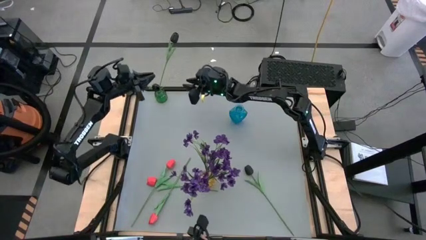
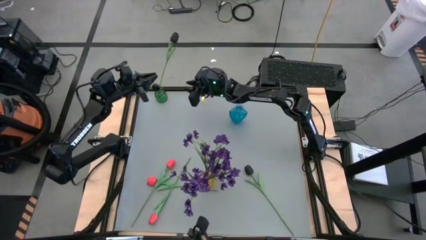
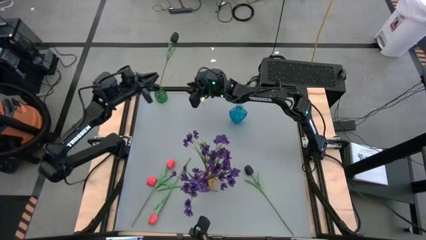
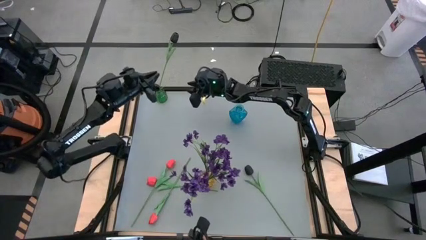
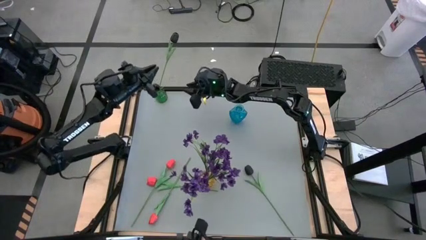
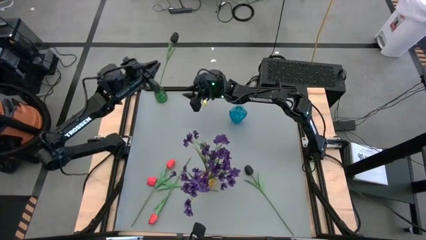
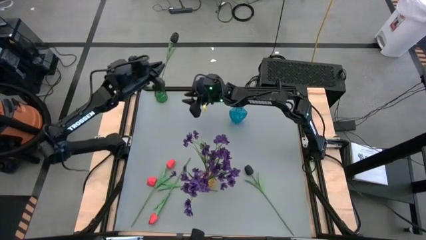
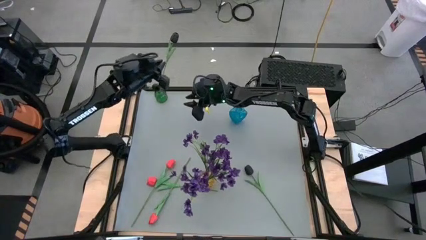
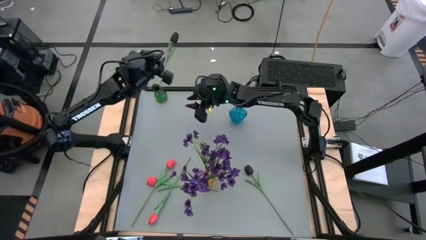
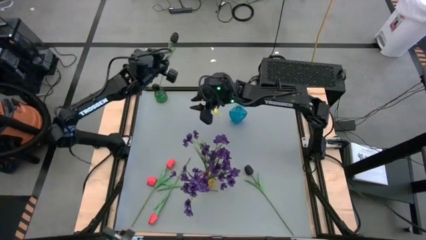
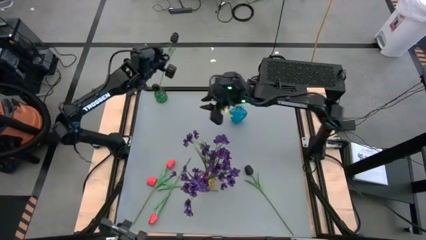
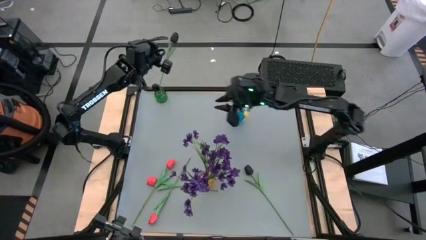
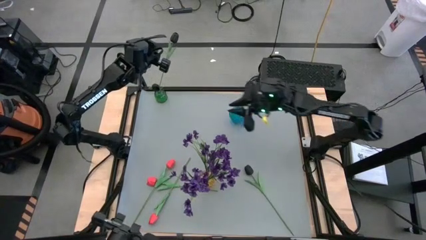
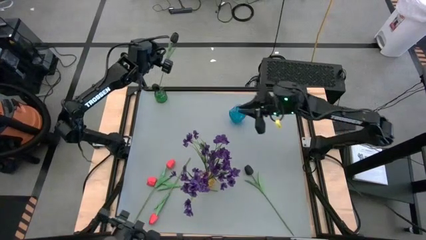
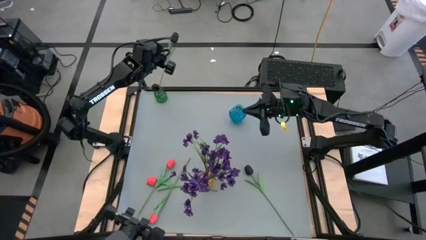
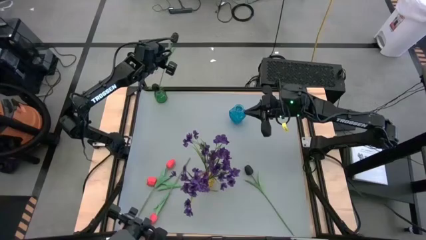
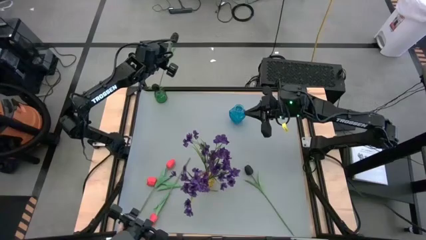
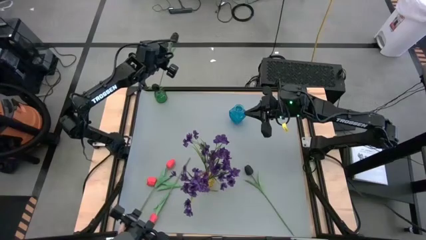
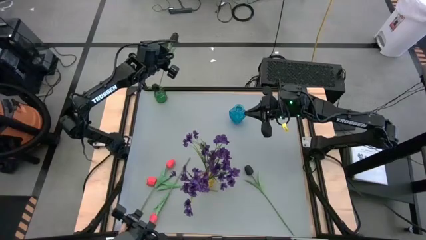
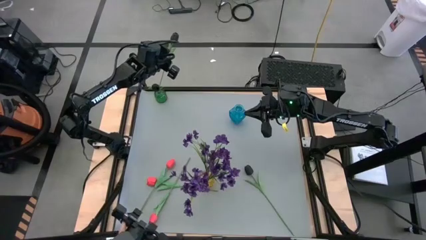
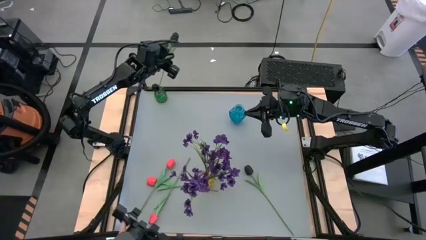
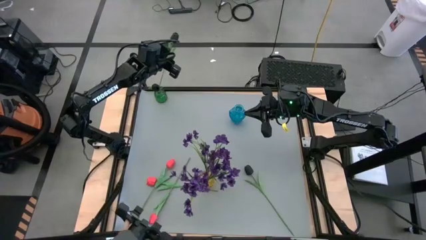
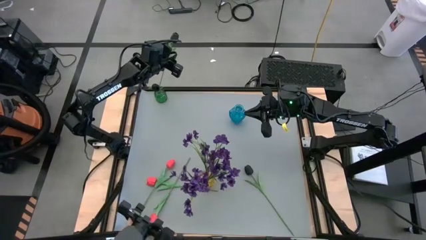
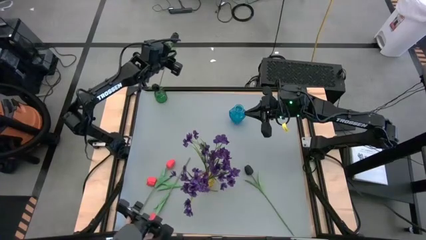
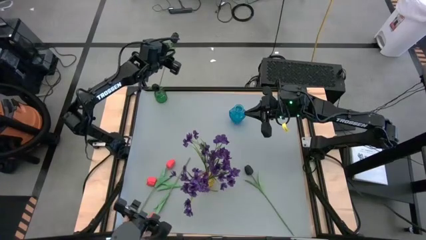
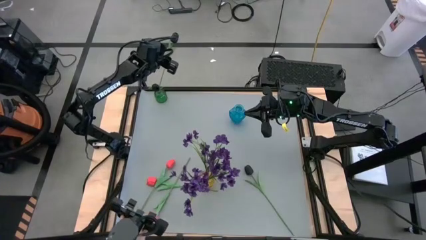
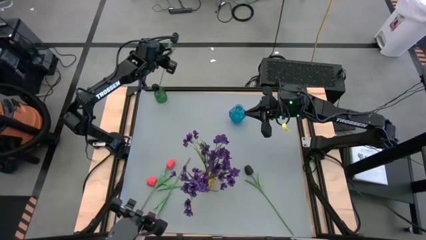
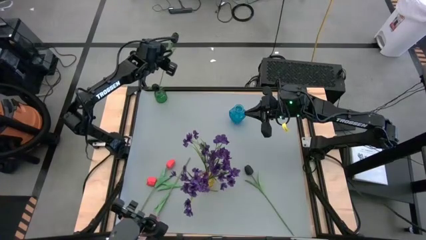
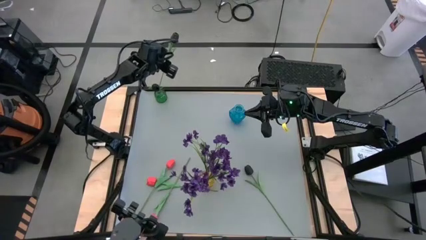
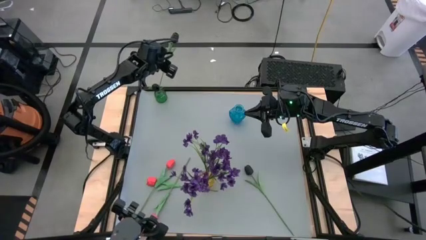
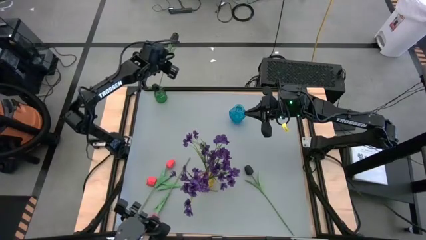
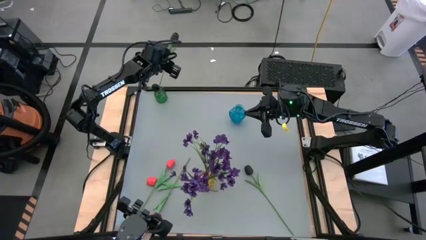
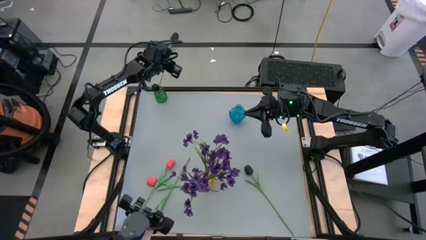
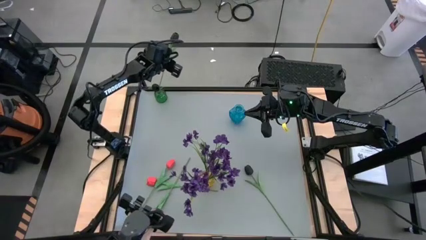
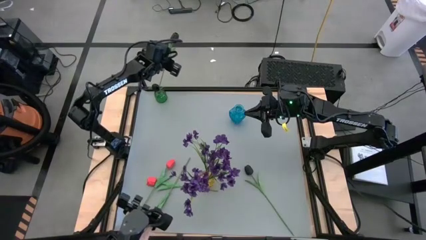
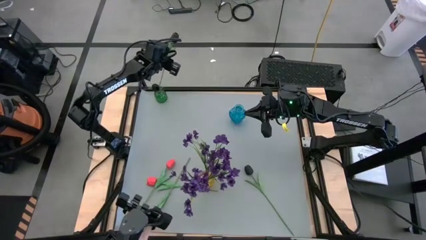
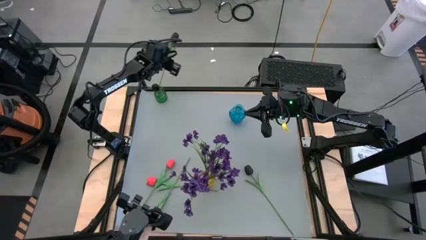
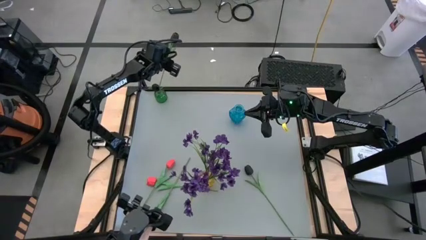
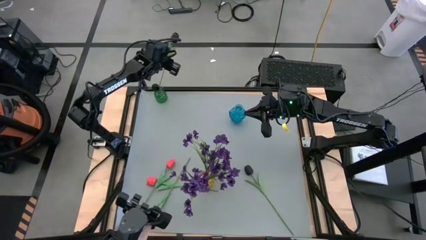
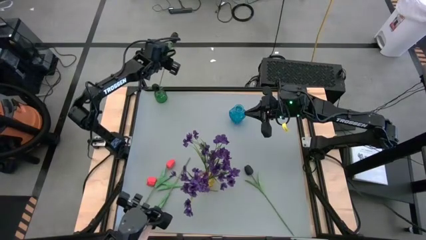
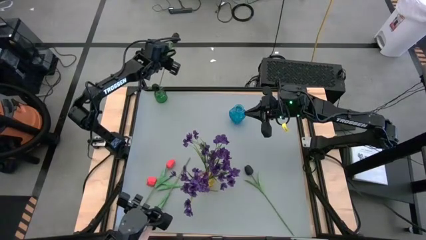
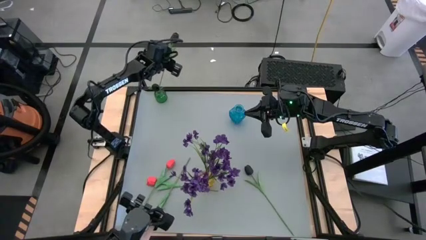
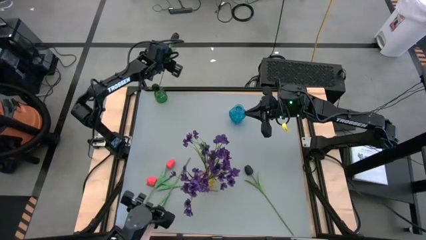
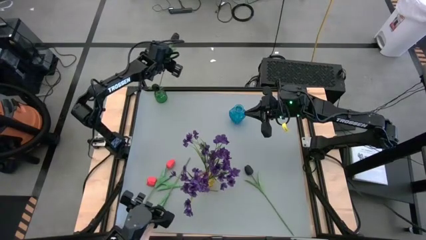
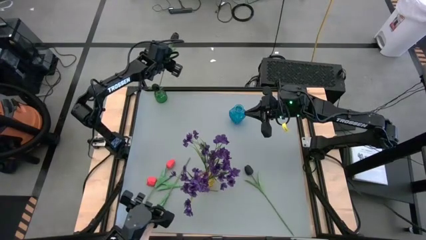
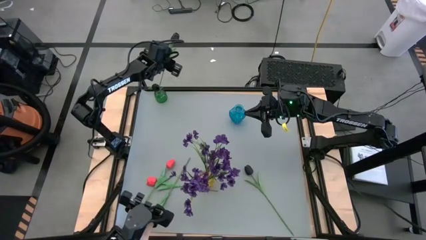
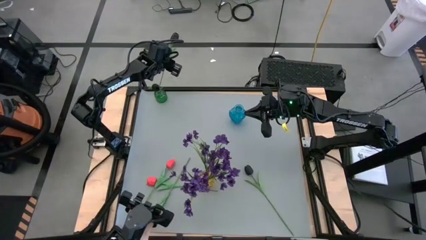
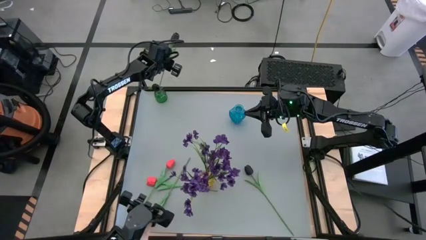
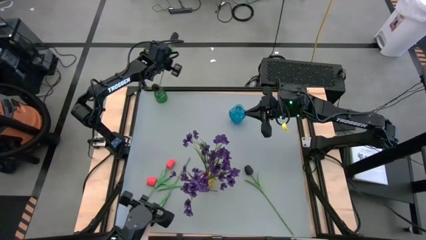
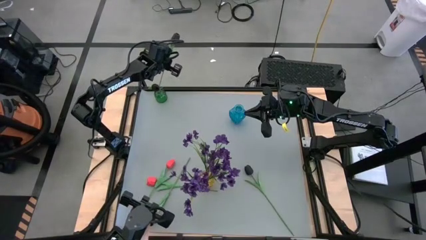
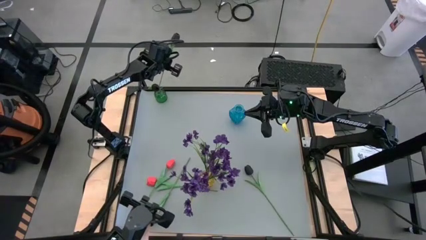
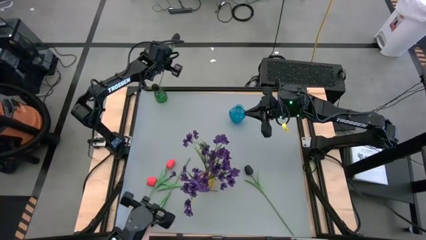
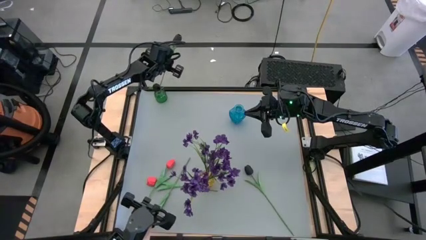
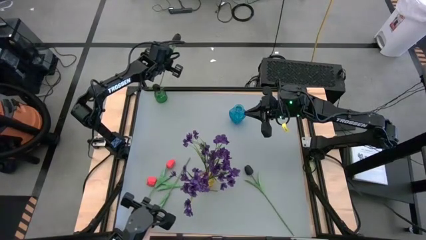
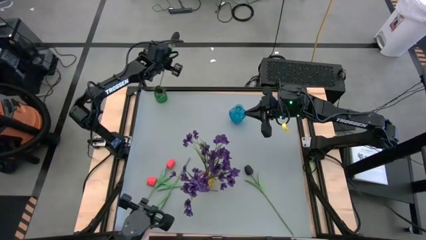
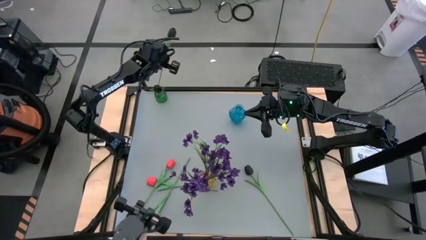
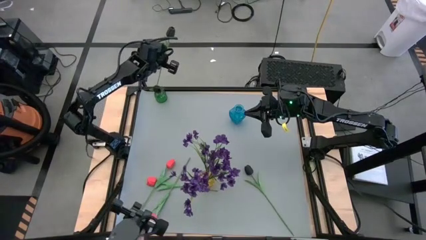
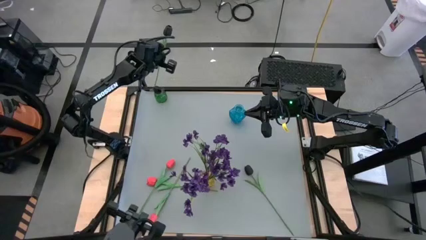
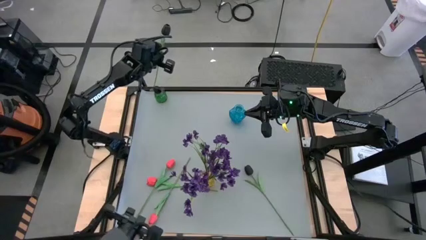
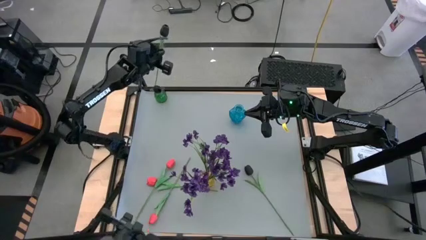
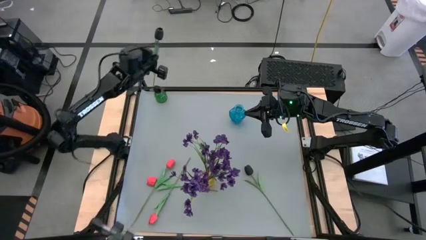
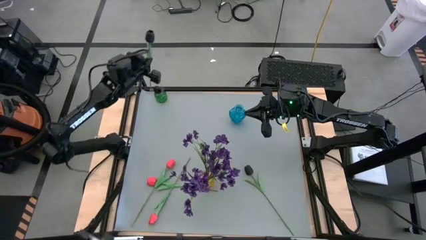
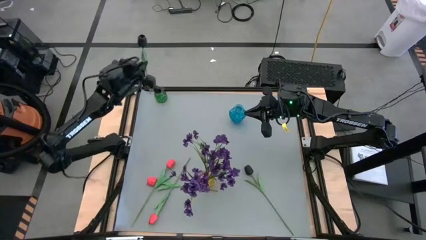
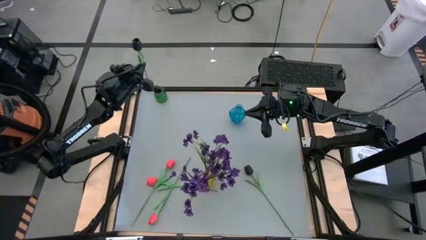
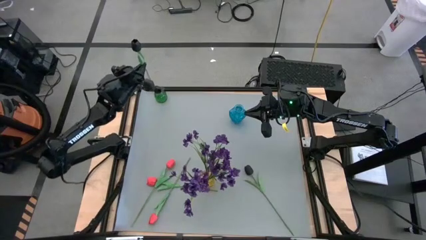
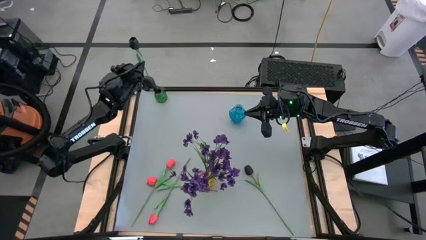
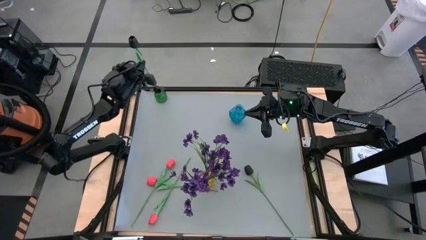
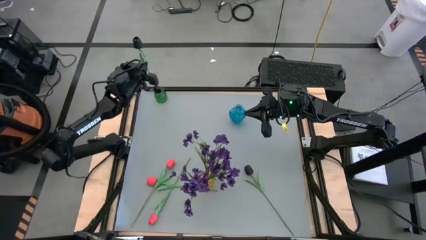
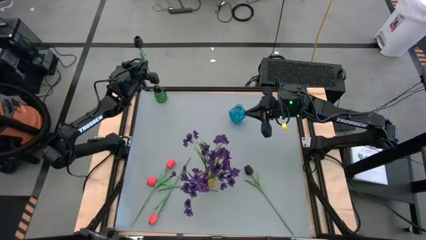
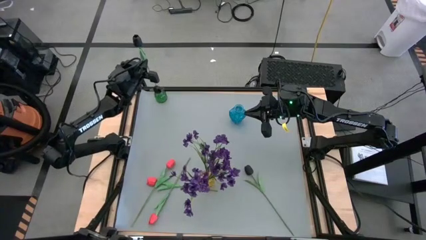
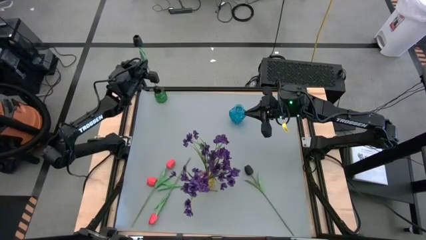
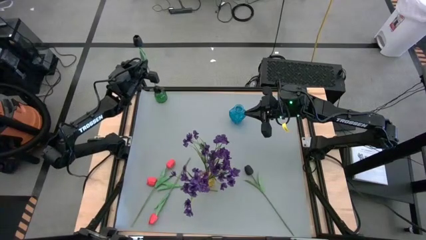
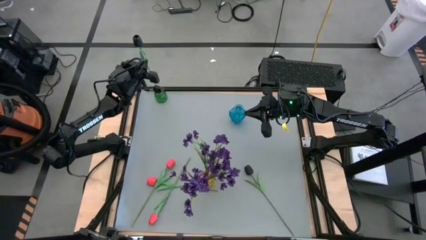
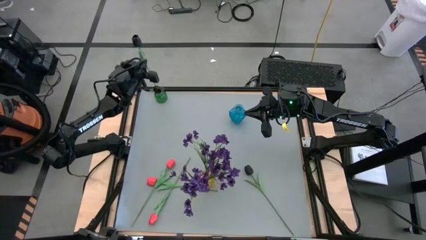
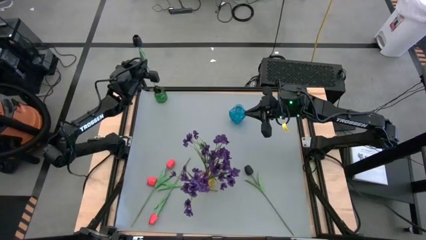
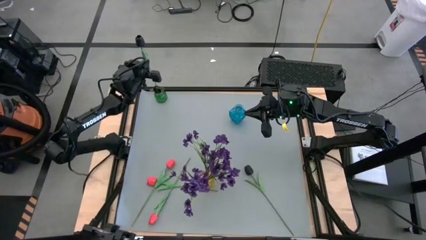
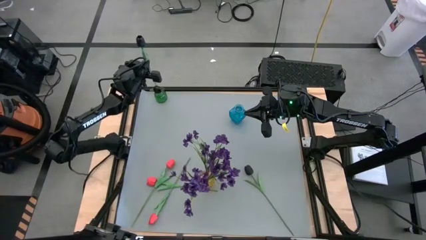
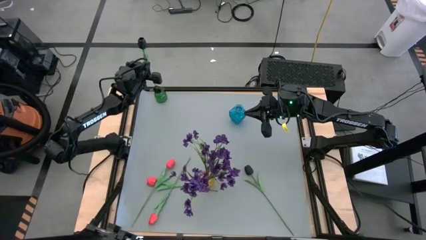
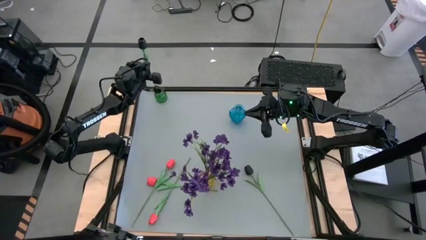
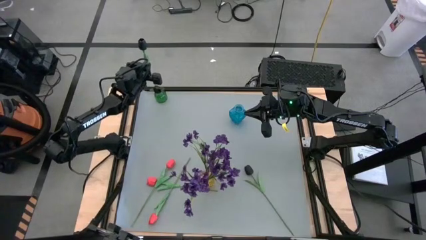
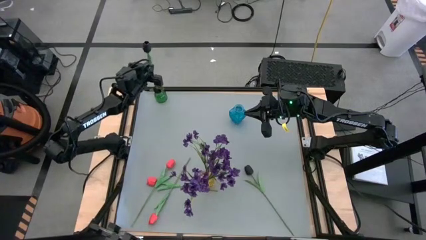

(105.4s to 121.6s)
Task: Sort flowers into vase by color
Put the bottom black flower into the green vase
